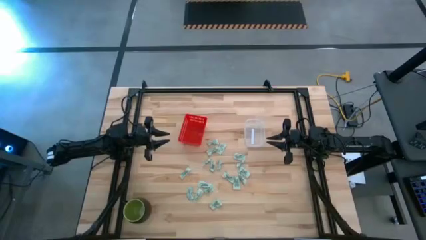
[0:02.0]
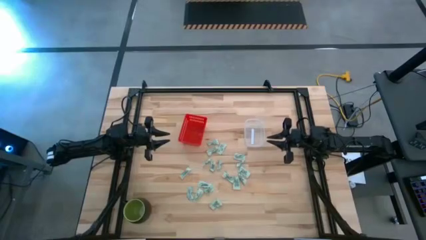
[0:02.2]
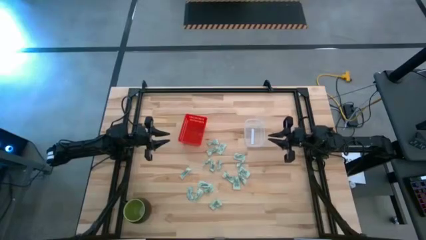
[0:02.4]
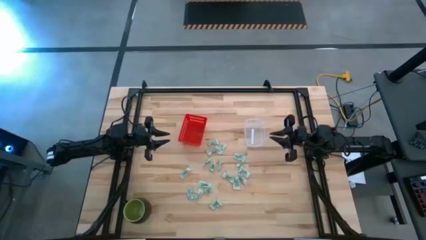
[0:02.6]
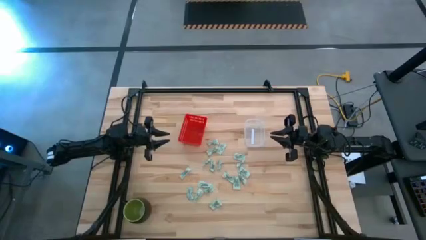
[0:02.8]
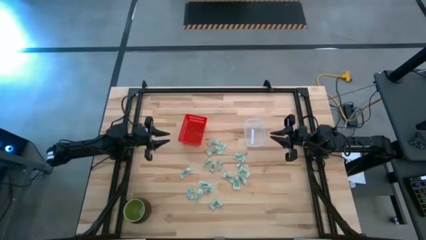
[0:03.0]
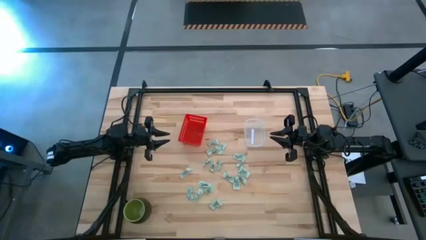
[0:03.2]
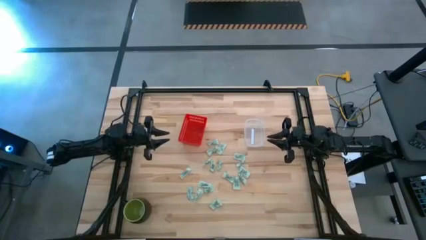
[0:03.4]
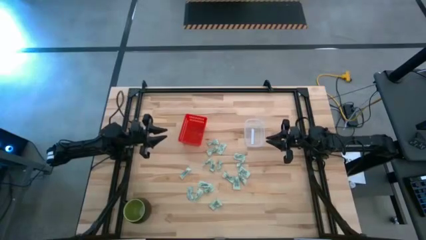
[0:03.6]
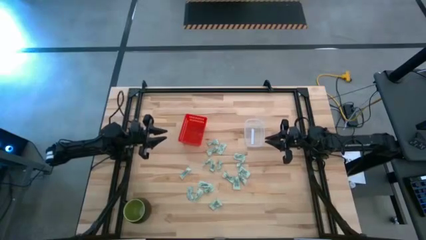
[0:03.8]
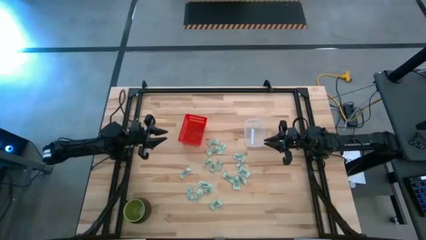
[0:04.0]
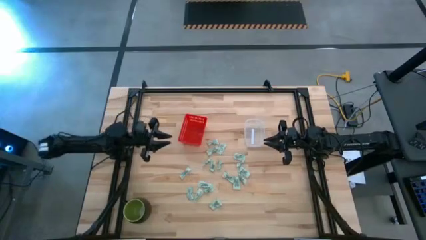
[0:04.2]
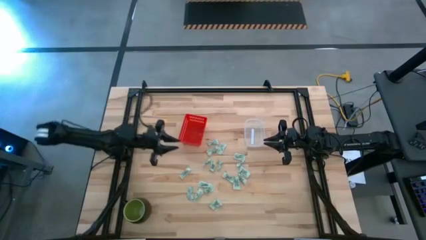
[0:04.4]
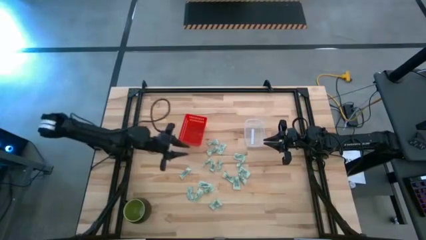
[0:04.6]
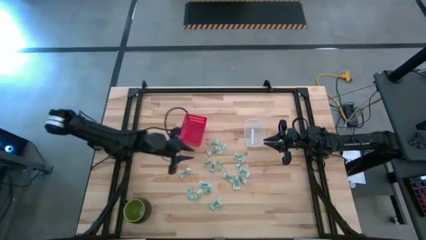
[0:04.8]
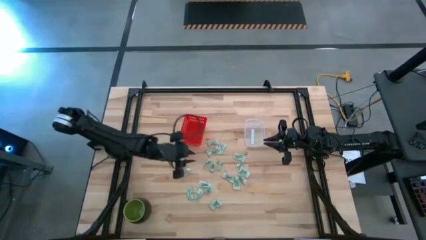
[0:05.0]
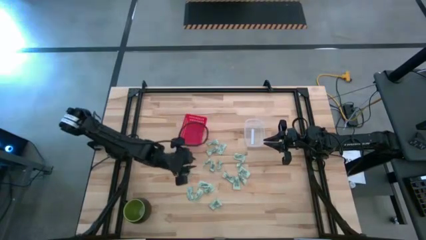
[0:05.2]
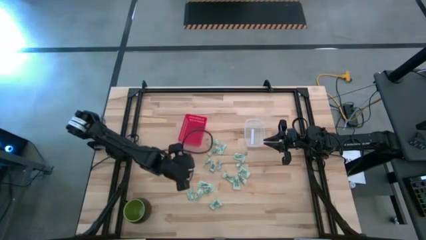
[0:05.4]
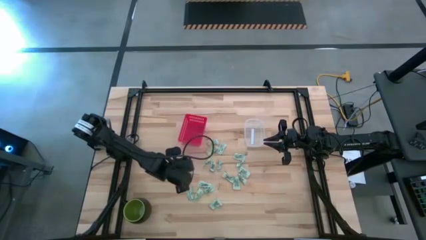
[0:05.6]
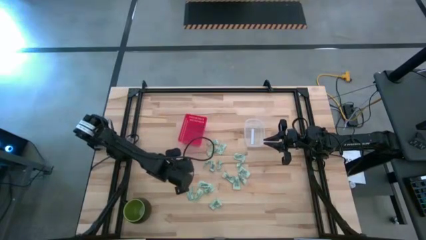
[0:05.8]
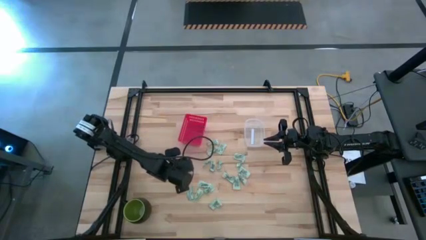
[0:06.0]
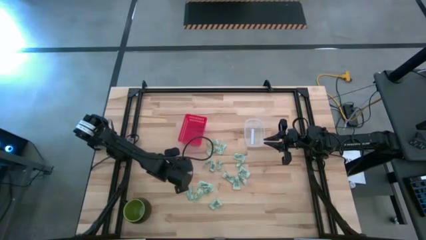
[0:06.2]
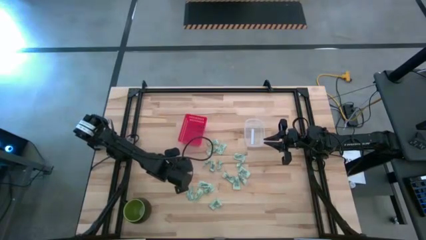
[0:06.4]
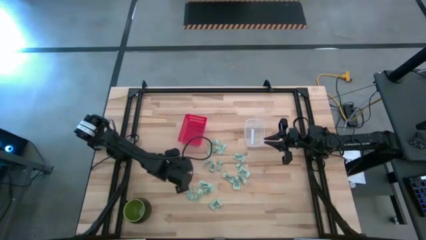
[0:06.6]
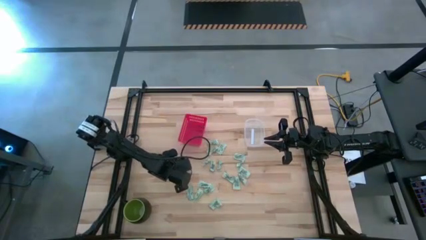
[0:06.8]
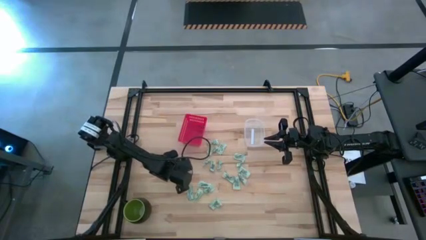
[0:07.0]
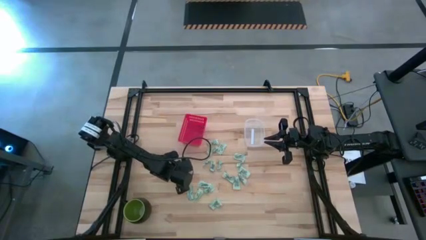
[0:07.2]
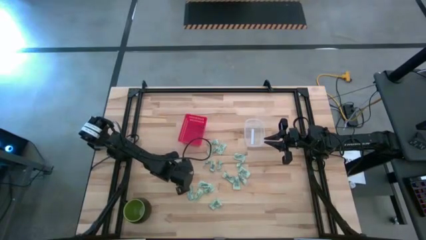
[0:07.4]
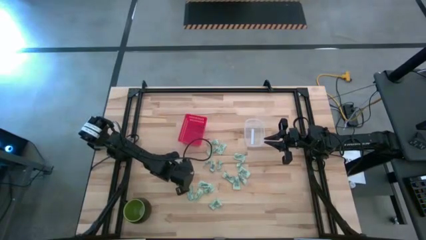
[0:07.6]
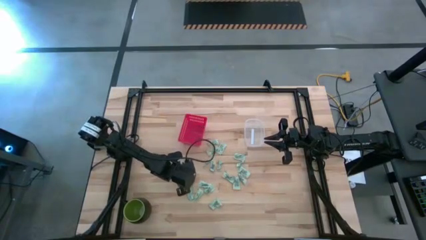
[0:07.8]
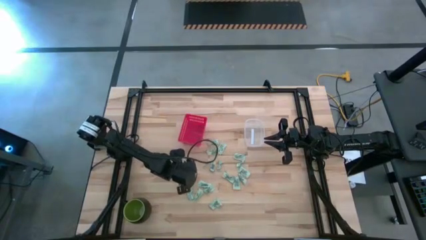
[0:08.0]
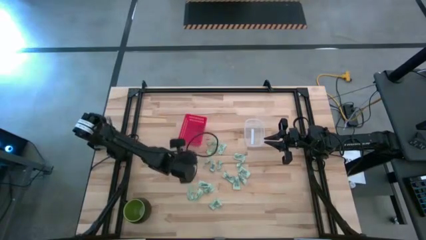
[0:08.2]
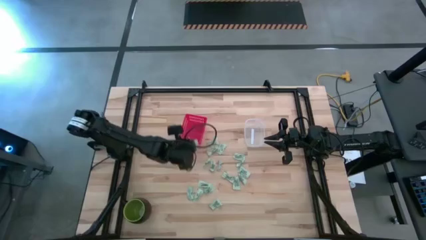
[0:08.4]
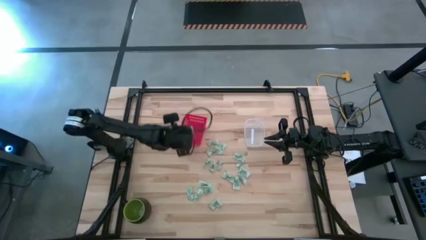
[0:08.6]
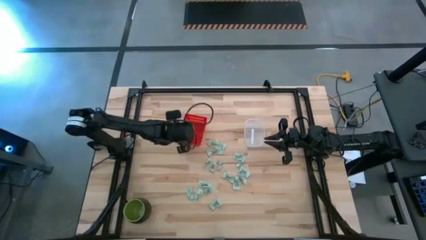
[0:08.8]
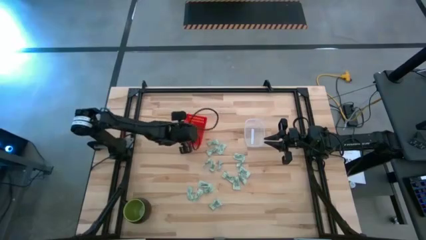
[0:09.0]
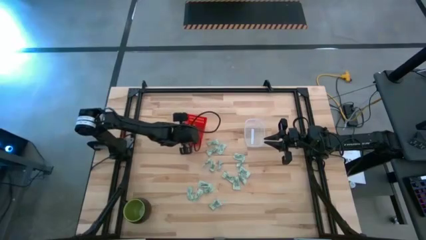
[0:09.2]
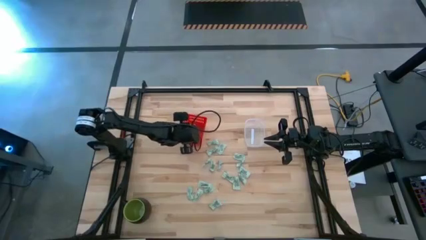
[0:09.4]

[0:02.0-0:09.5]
Task: Pick and place items into bin
Put the stevia packet into the red bin

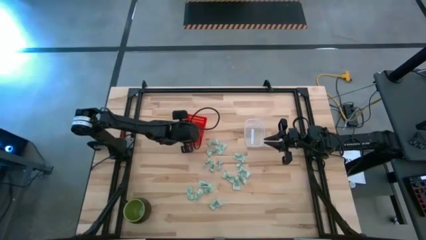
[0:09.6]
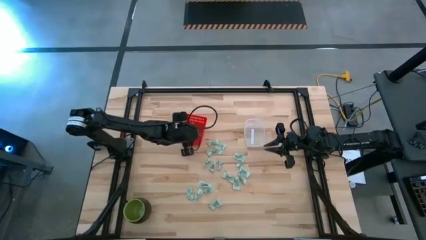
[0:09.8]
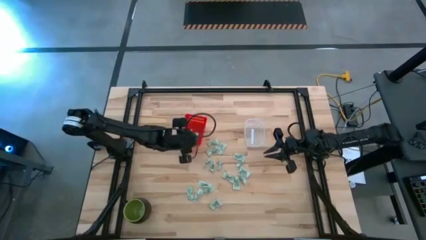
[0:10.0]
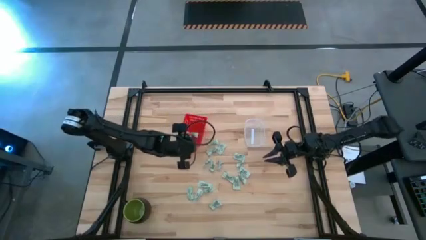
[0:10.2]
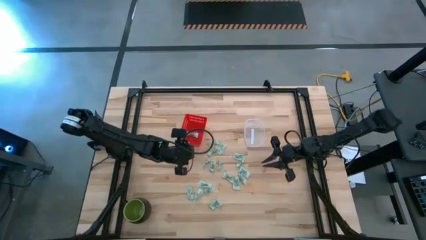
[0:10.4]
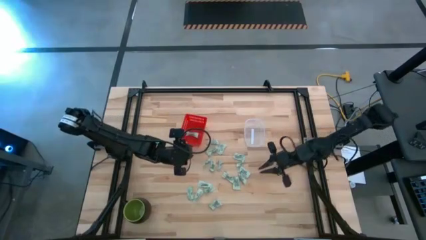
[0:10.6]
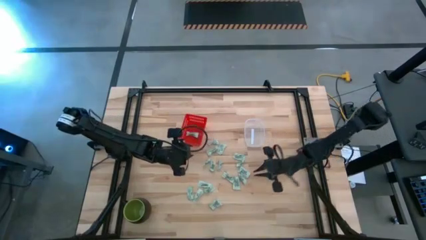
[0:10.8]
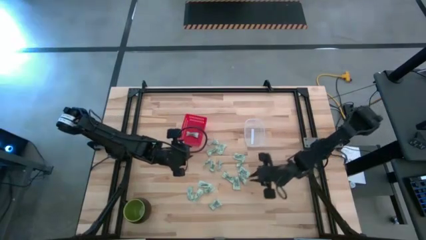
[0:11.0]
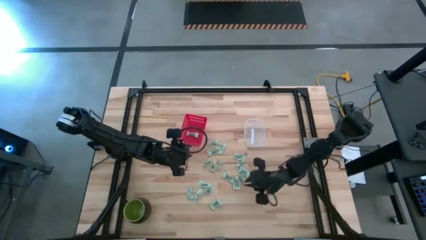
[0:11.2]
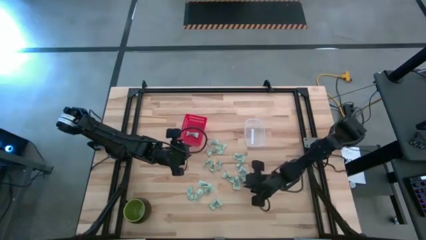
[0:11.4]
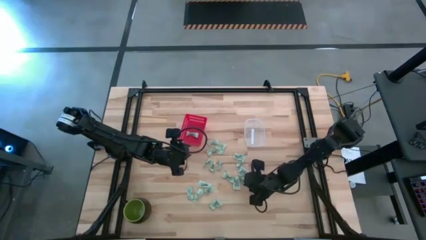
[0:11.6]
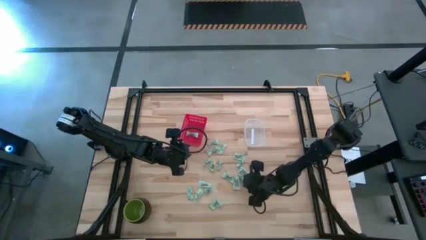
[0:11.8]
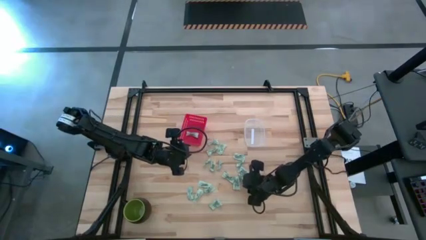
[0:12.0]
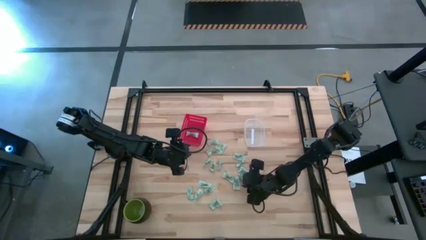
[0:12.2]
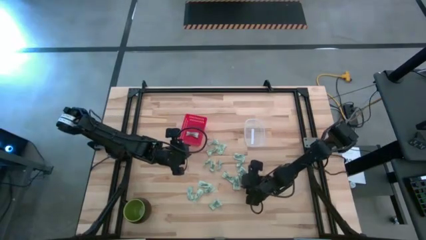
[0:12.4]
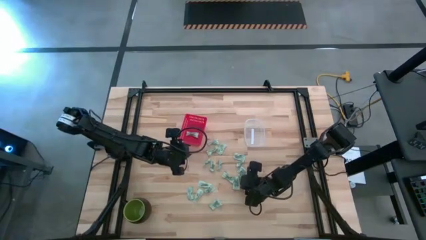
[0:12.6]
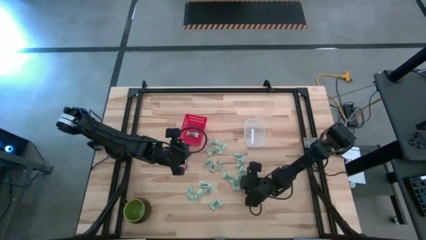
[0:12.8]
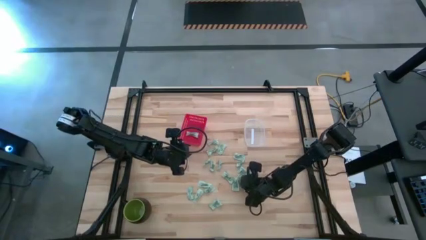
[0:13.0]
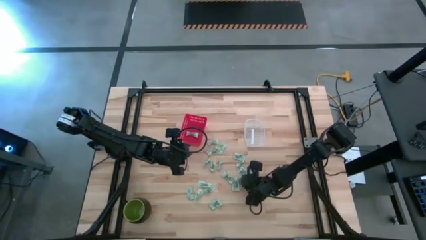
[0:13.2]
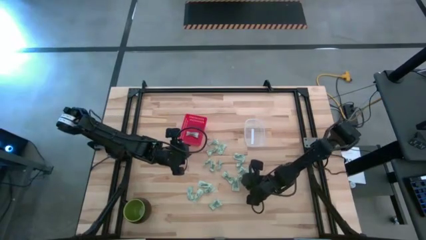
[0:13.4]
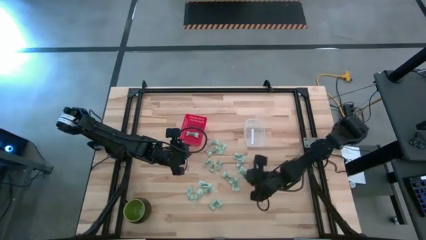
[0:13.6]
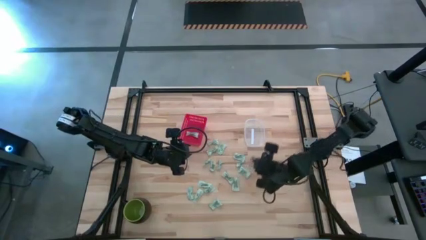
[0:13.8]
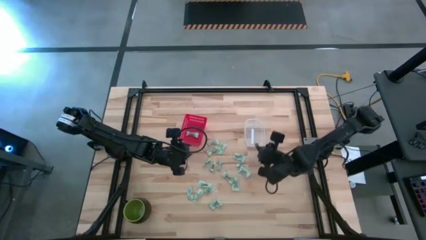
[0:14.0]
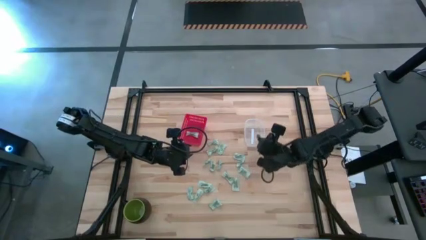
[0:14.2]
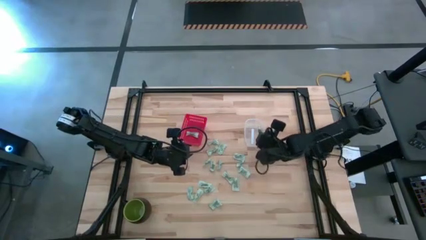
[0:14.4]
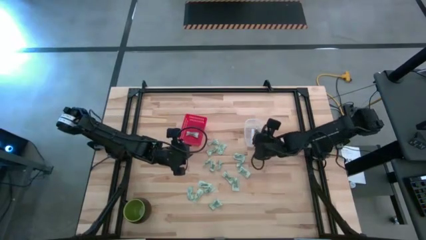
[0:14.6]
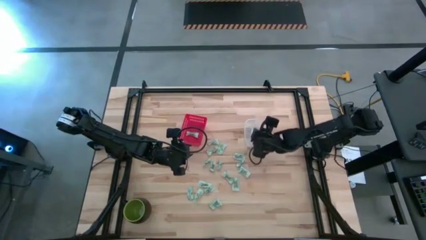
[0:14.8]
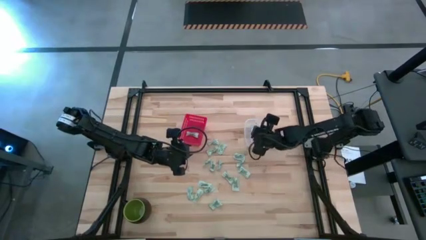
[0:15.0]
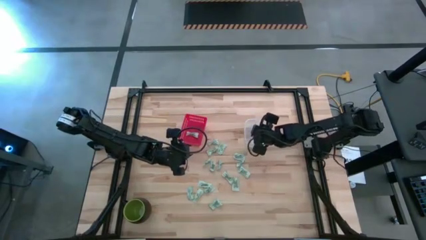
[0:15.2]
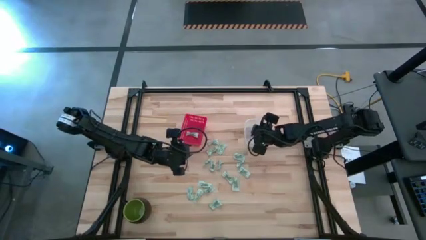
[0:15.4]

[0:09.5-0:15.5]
Put the stevia packet into the transparent bin

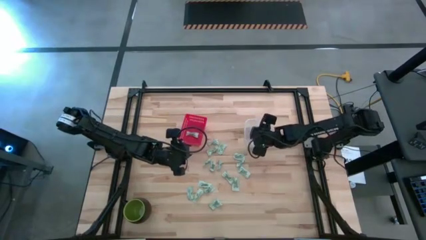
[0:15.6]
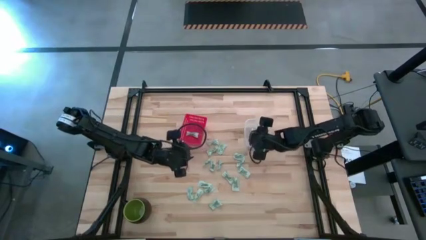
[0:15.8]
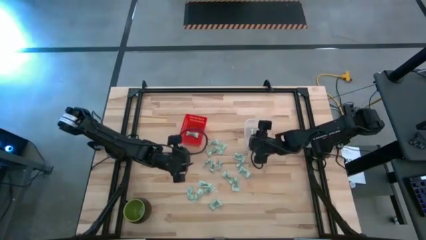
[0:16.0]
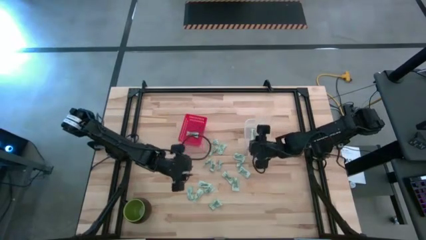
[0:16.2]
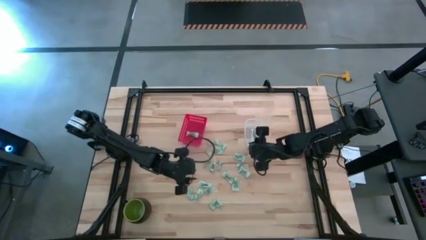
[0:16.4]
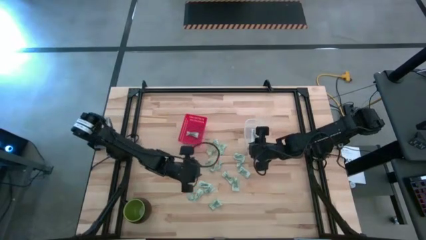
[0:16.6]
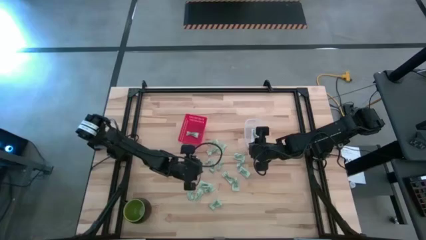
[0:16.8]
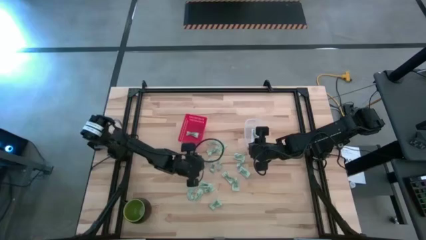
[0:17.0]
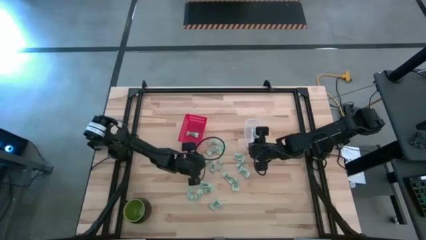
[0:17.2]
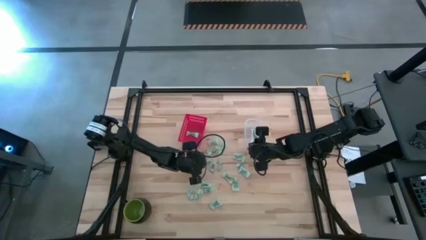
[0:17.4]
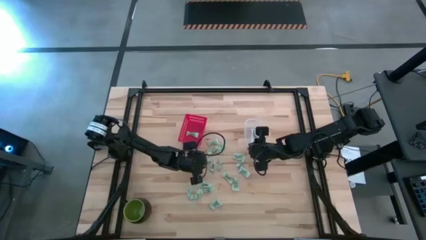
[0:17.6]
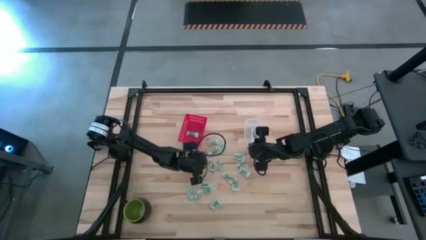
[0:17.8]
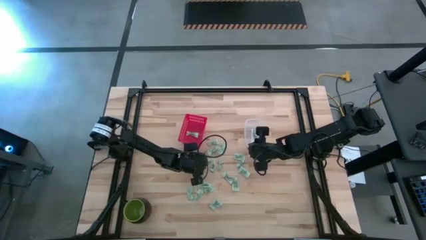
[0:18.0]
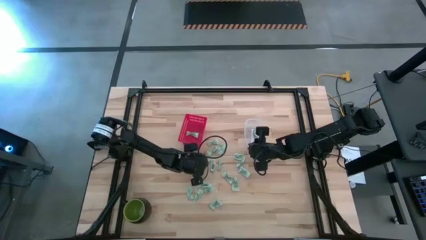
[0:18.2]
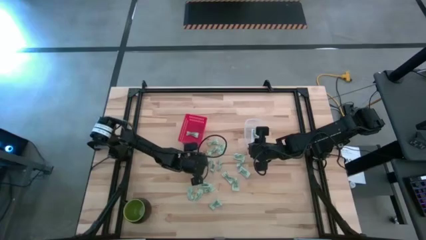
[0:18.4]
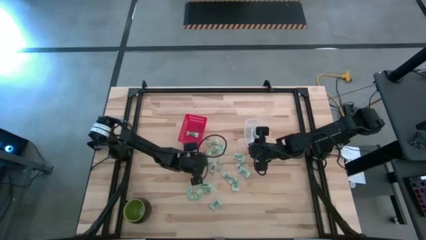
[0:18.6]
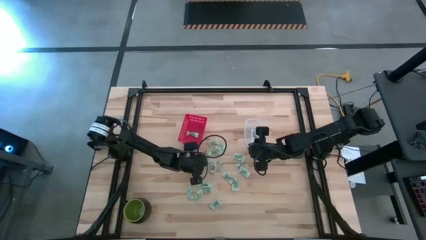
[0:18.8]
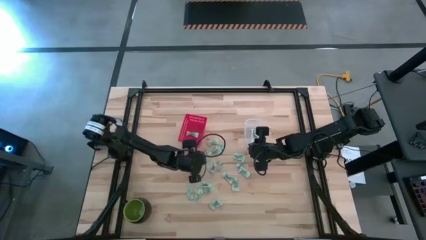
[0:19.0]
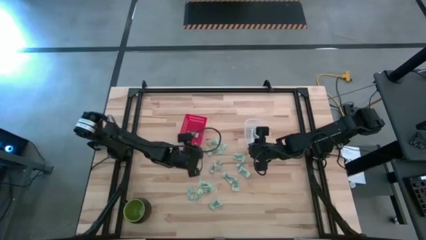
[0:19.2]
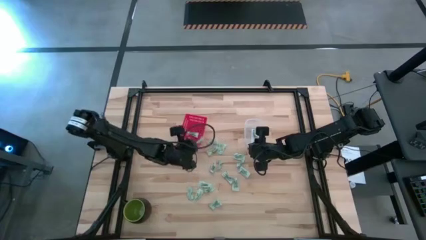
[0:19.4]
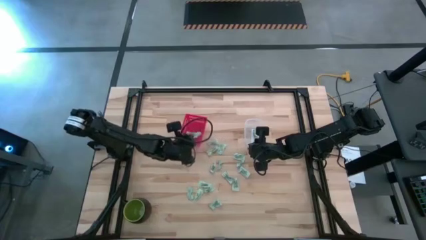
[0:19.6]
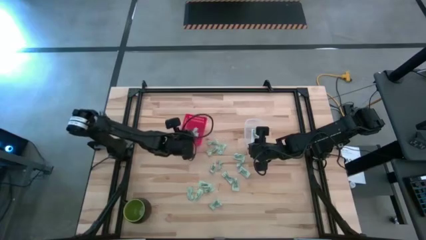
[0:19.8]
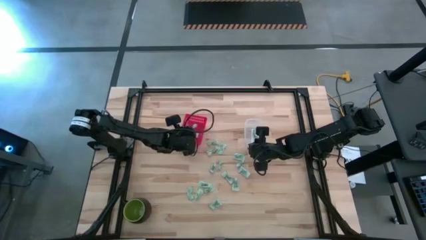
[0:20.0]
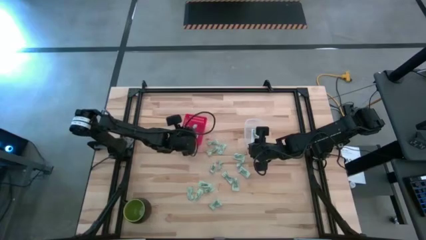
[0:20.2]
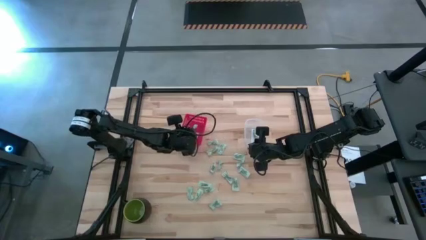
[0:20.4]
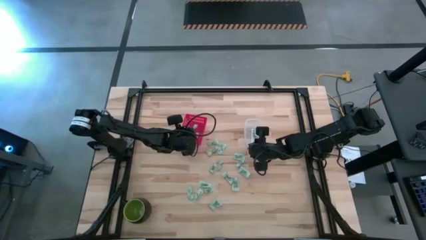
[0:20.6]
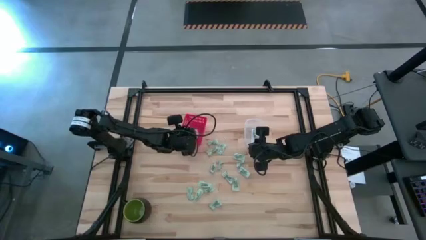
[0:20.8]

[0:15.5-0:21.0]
Put the stevia packet into the red bin
